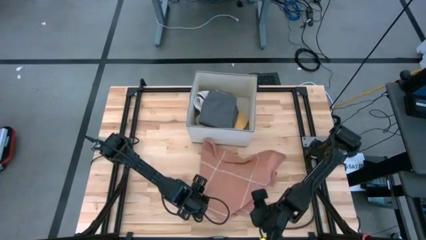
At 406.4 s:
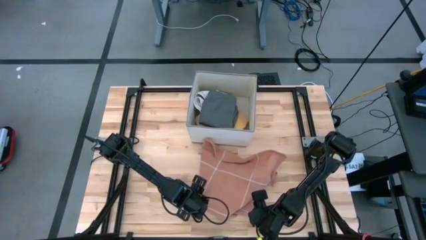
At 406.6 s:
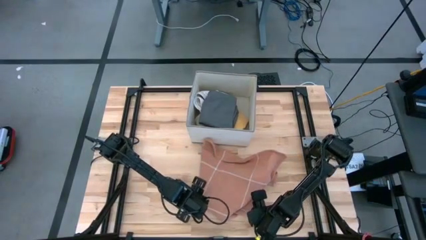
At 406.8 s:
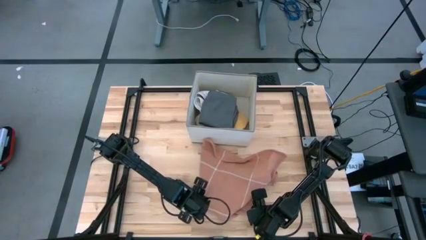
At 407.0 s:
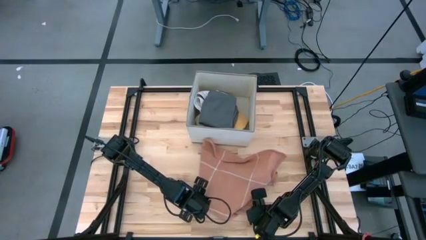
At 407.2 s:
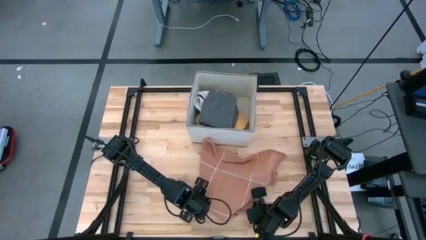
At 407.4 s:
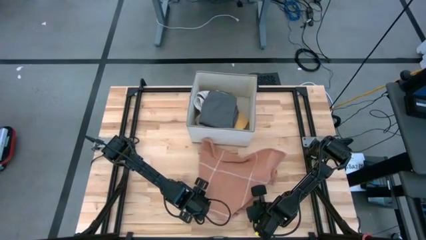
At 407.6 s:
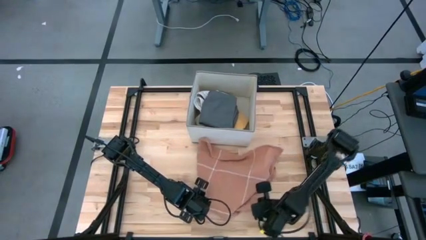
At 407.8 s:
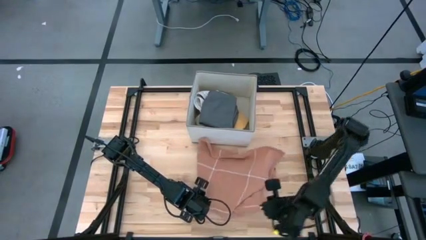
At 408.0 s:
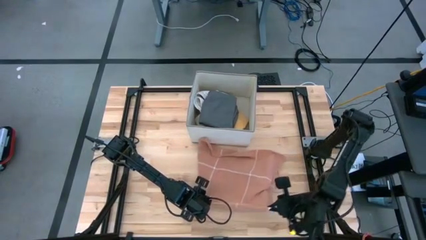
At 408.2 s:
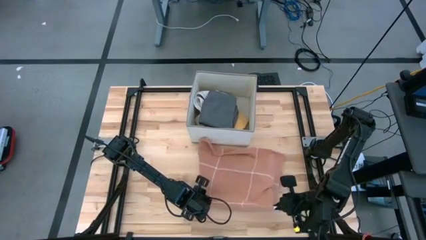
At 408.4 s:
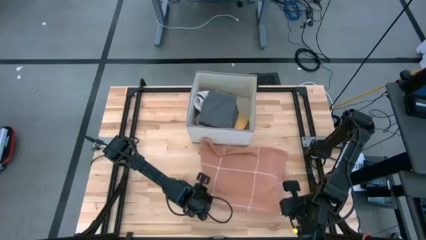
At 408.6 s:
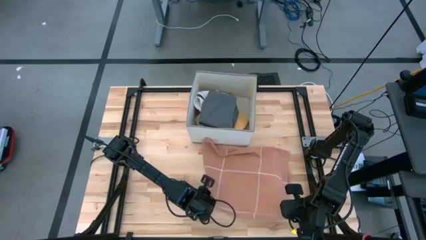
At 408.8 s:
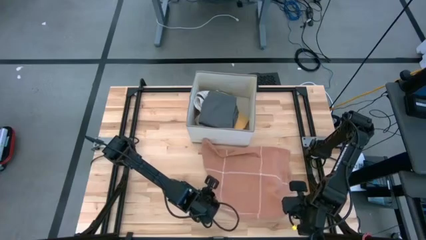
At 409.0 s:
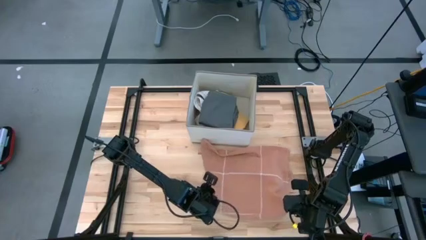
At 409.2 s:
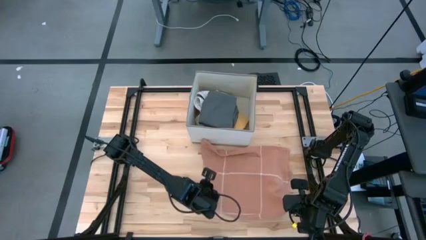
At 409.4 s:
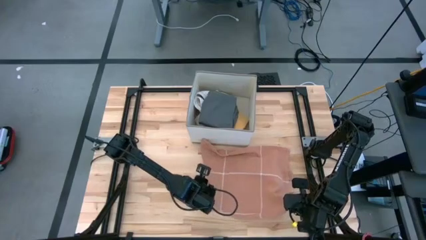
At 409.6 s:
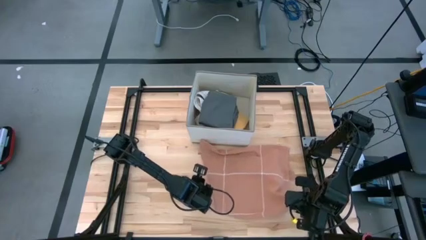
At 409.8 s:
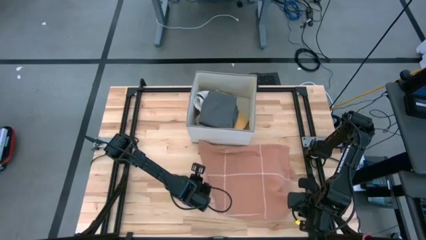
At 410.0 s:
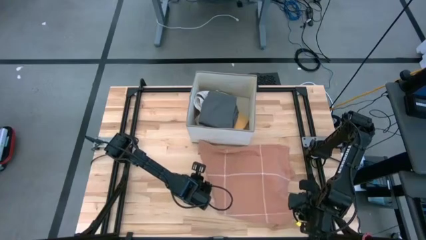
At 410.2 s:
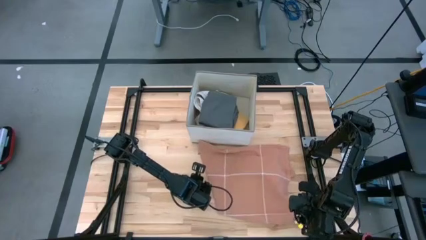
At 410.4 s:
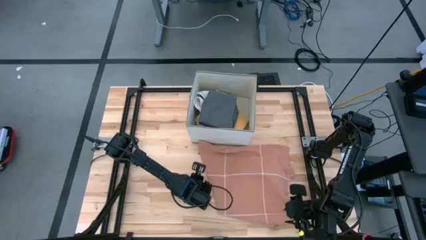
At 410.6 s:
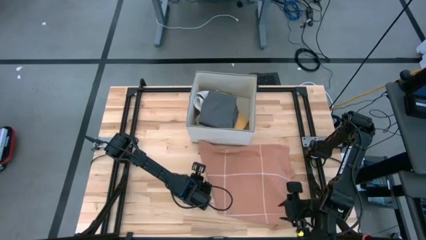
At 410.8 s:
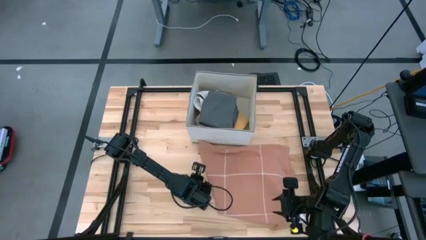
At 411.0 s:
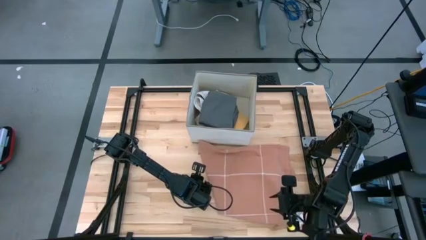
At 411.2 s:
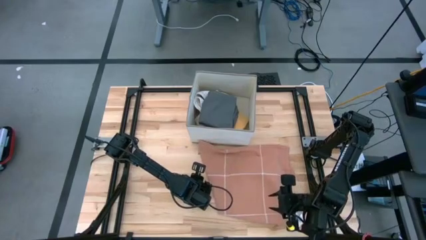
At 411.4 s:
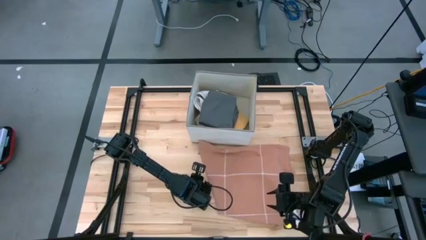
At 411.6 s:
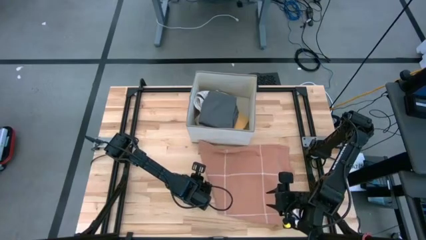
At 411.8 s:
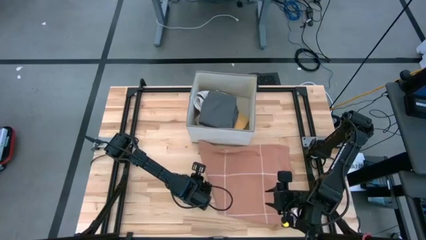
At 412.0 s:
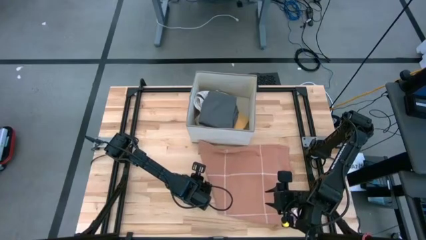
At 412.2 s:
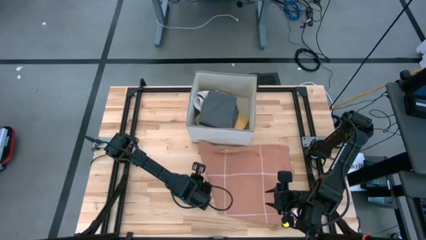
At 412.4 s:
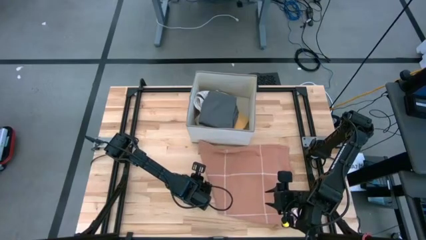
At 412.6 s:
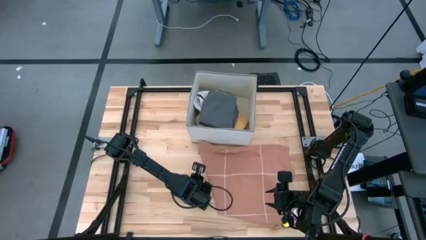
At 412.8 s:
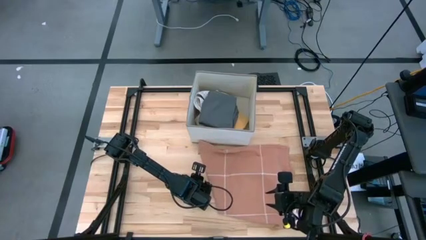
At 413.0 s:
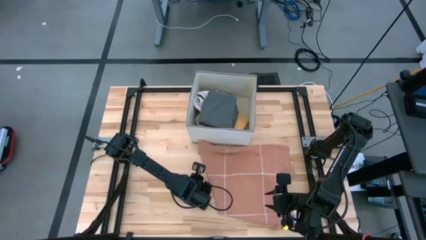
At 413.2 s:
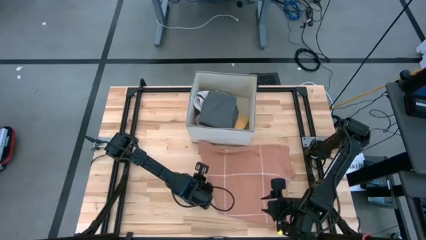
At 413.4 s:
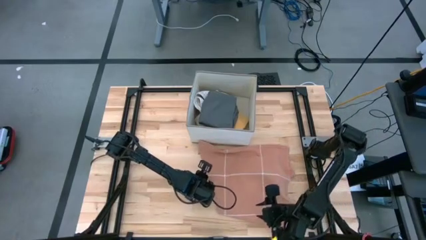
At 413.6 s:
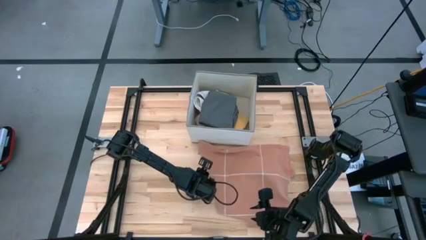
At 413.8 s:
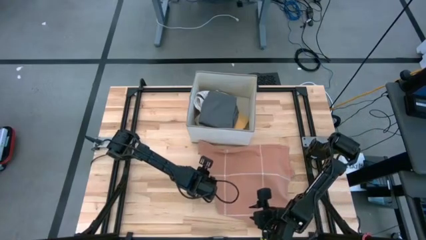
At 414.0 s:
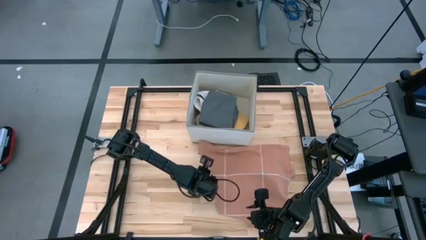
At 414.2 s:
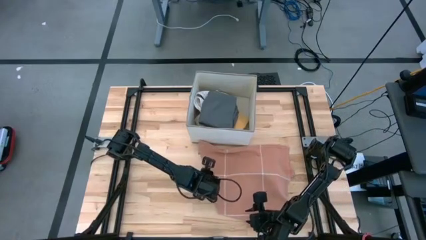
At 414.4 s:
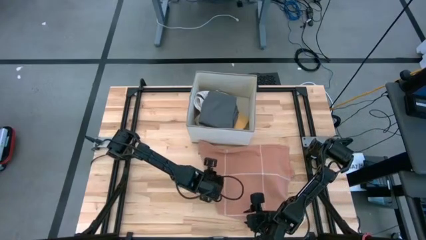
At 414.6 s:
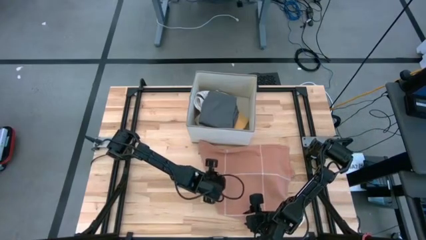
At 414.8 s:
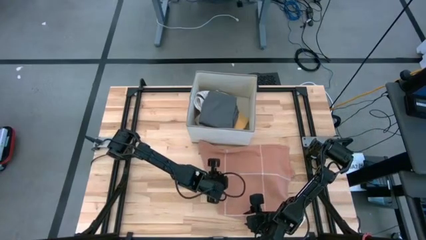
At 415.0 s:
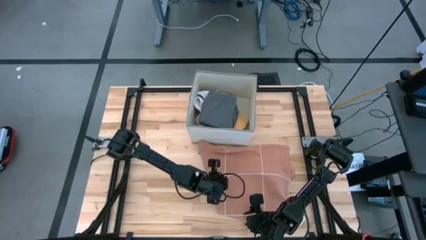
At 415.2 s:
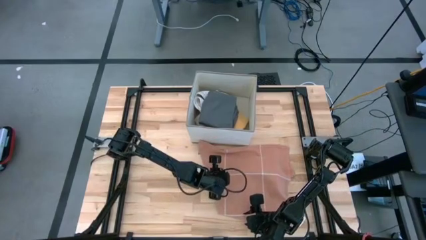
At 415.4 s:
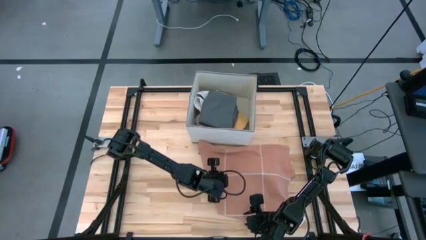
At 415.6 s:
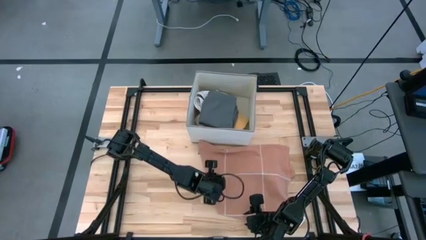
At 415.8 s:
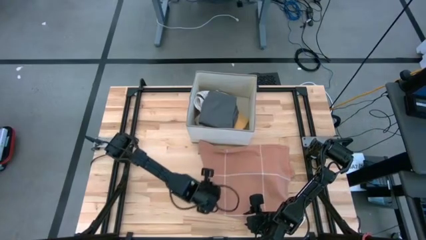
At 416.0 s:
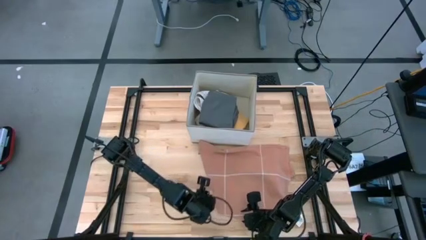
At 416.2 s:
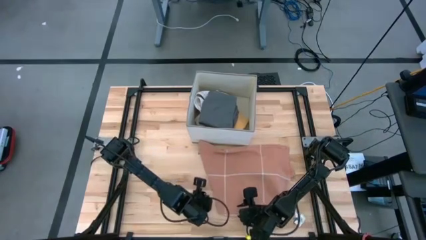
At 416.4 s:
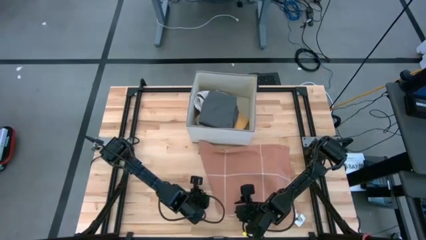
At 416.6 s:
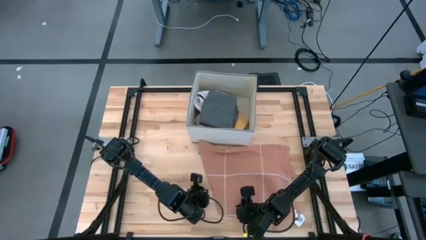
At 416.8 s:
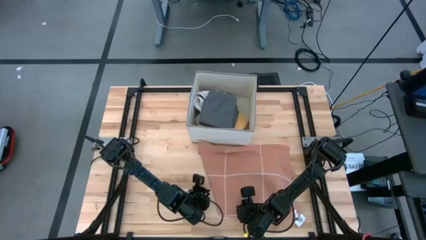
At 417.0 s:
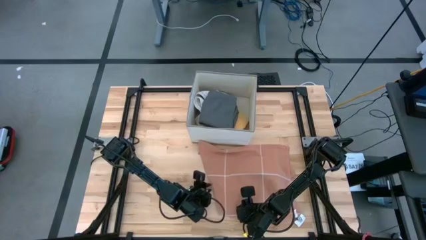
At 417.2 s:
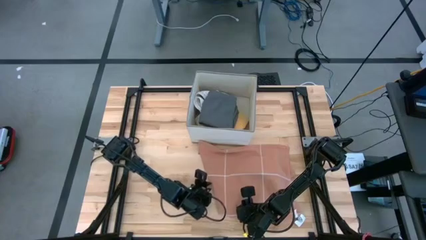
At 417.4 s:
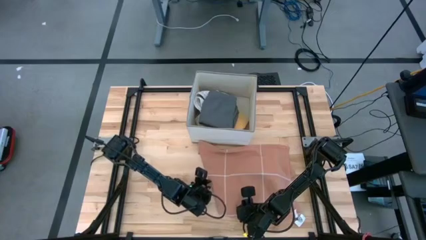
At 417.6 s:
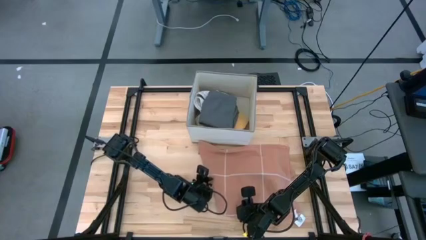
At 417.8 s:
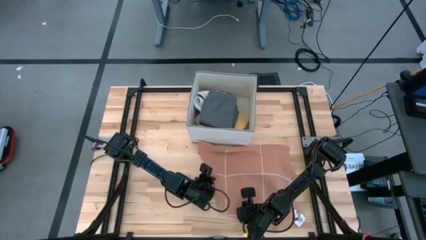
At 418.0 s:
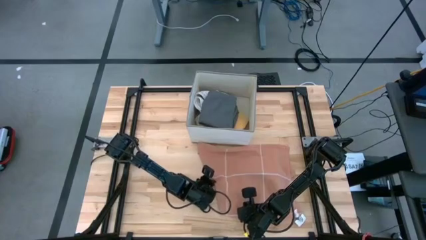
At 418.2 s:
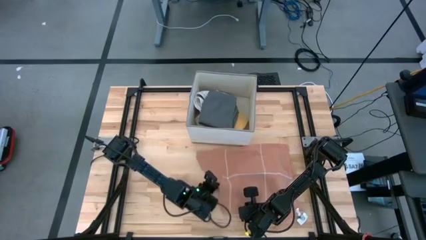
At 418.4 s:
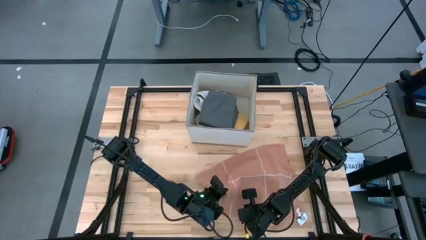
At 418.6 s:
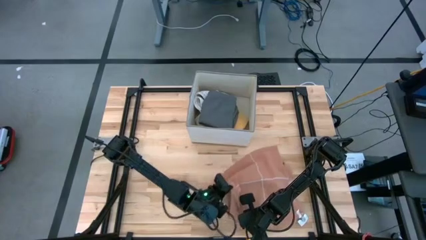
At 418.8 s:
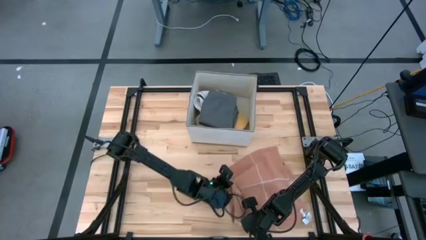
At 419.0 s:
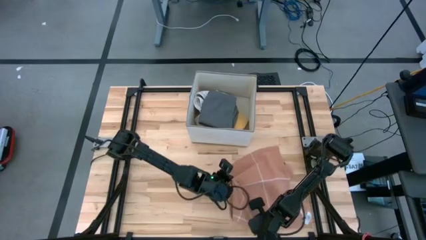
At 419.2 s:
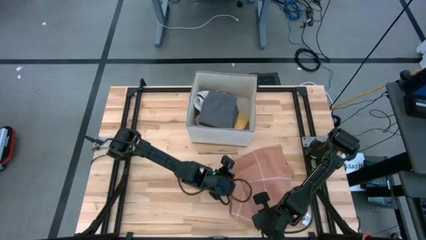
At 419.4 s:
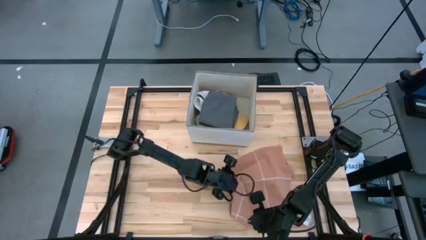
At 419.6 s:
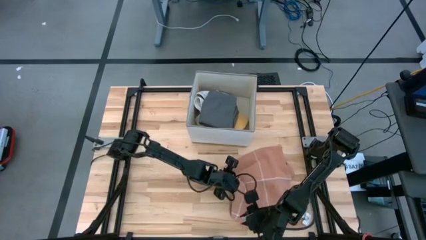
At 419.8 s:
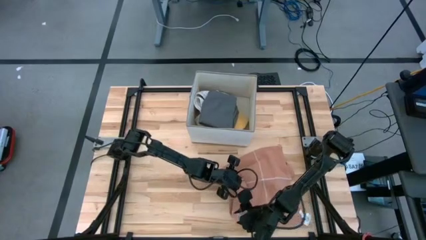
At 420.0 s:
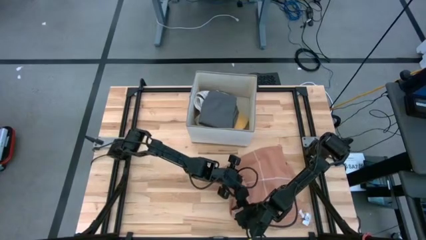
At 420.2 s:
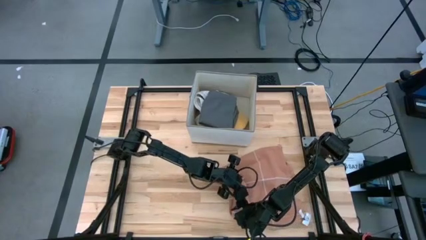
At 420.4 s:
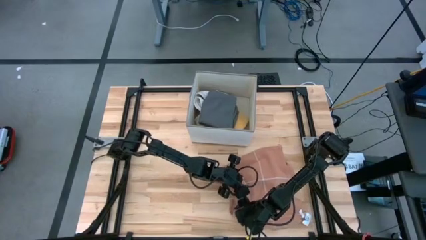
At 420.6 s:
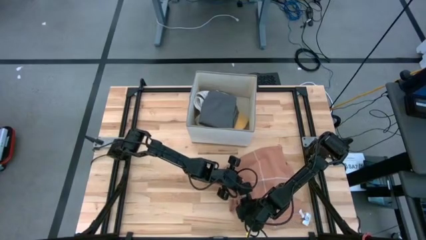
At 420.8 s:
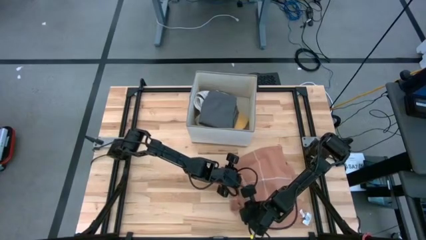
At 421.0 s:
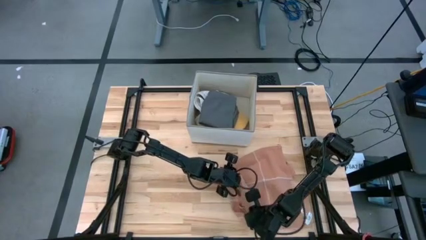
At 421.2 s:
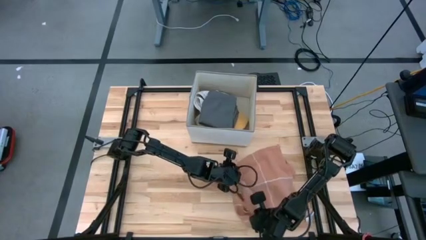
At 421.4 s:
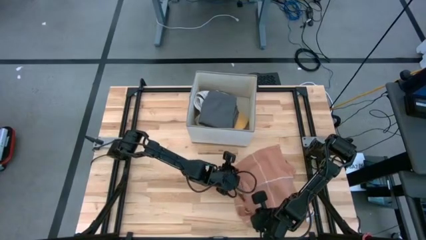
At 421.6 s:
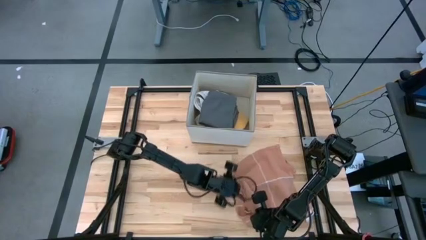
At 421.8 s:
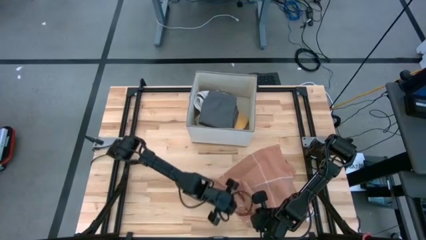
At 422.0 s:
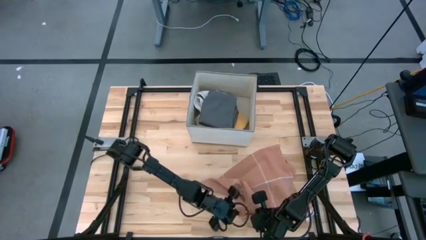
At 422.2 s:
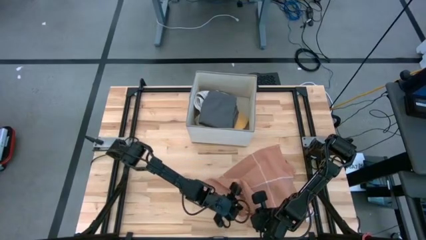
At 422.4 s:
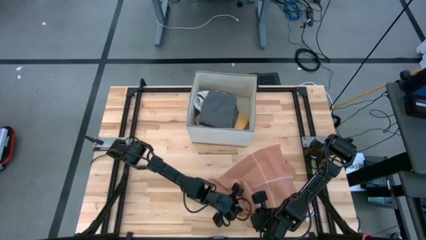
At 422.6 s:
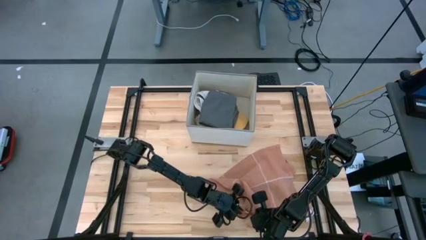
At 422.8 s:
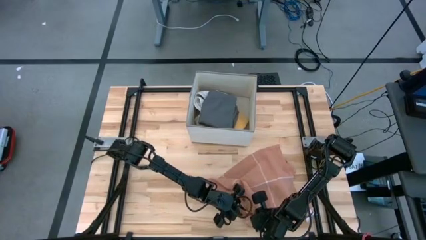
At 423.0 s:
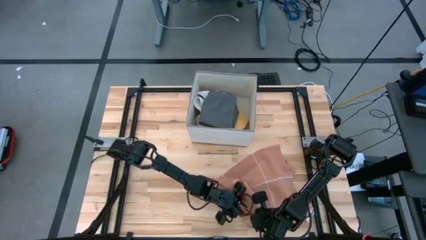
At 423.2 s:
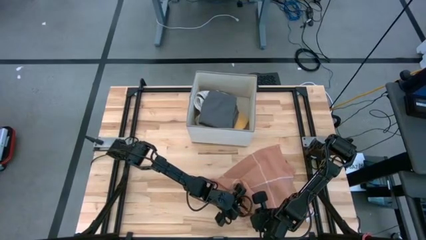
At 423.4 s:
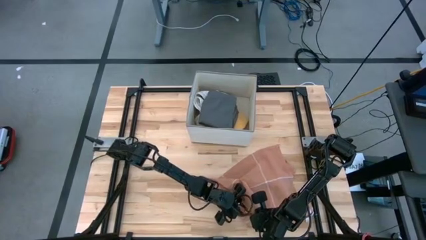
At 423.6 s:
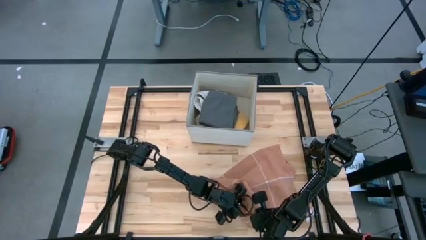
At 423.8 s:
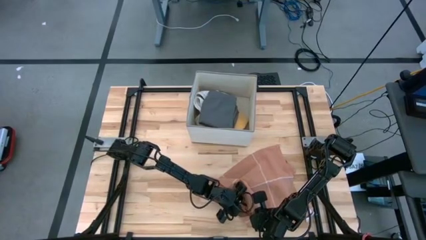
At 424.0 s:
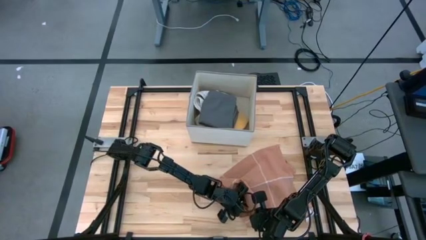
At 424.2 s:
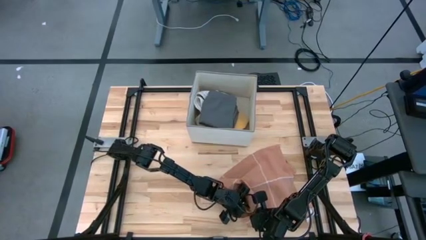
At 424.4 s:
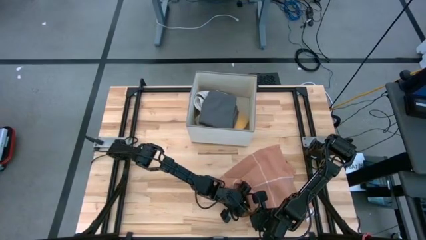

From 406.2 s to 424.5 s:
Task: Fold towel
Fold the brown towel with white checkered lines
